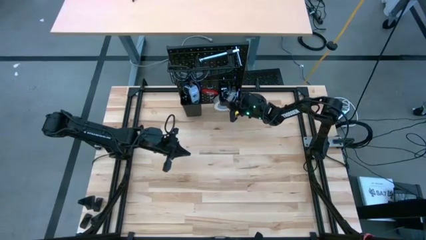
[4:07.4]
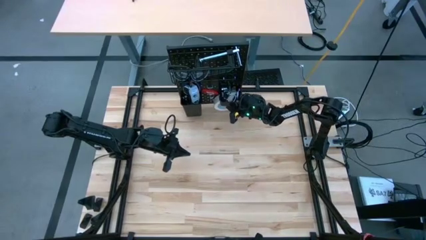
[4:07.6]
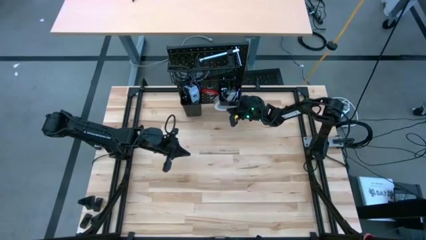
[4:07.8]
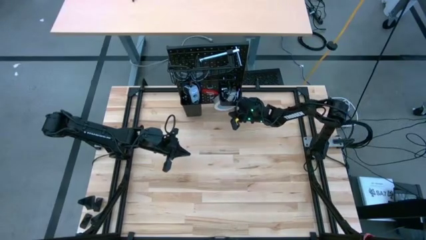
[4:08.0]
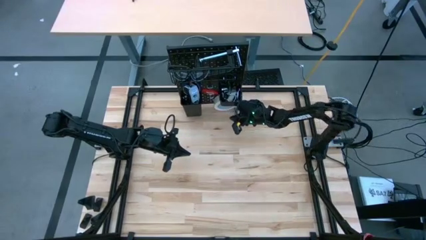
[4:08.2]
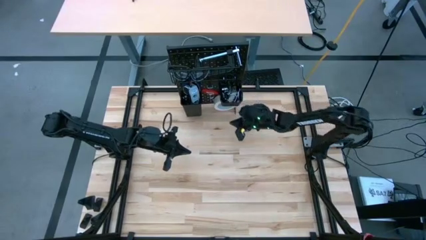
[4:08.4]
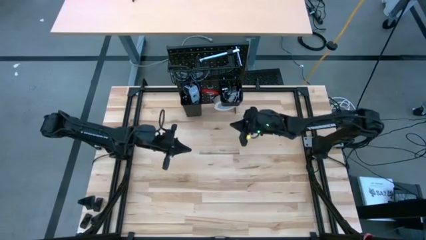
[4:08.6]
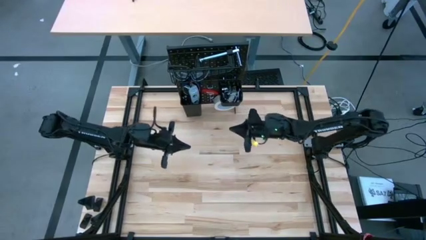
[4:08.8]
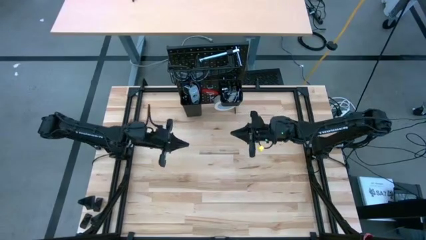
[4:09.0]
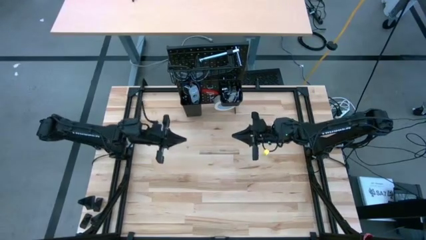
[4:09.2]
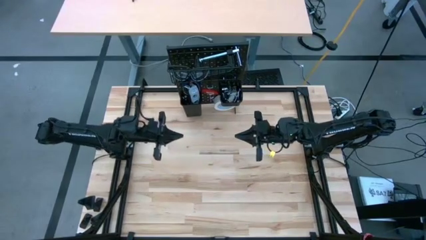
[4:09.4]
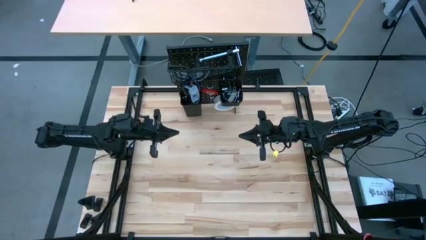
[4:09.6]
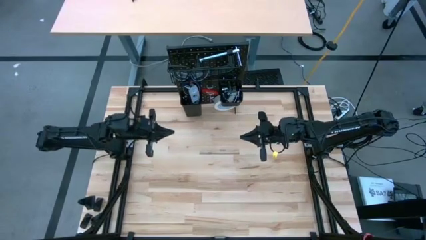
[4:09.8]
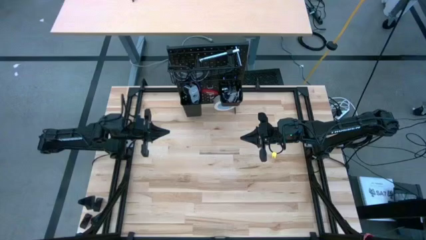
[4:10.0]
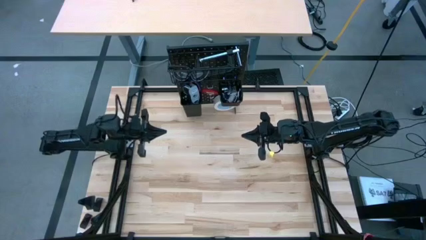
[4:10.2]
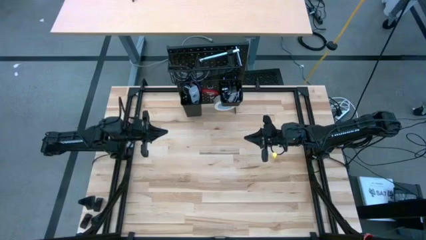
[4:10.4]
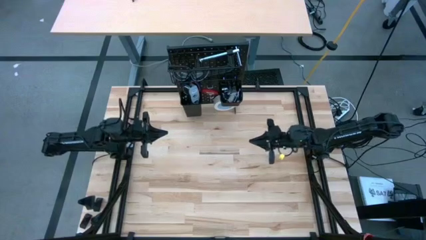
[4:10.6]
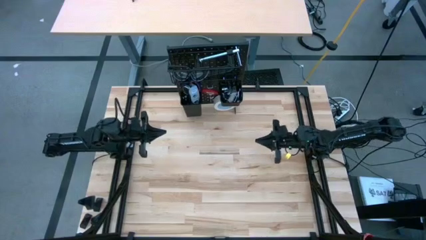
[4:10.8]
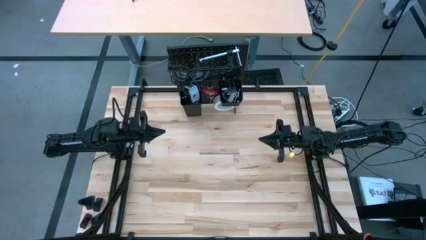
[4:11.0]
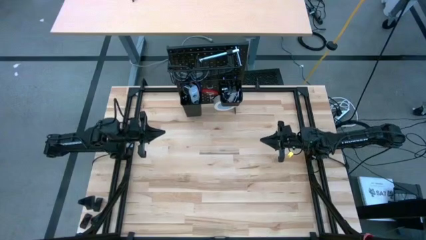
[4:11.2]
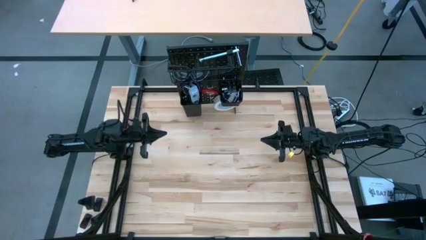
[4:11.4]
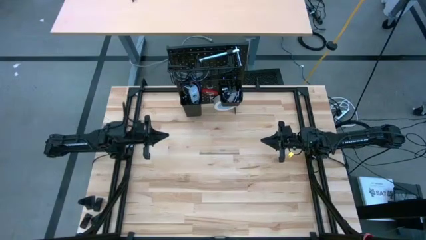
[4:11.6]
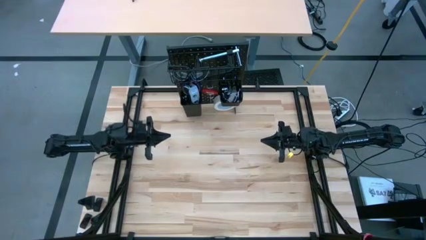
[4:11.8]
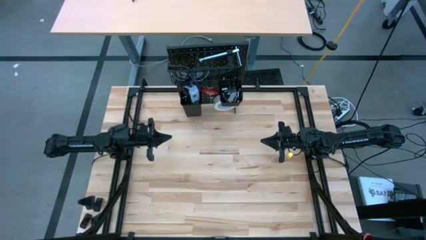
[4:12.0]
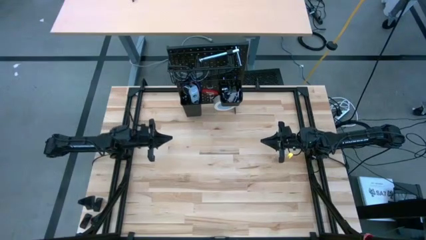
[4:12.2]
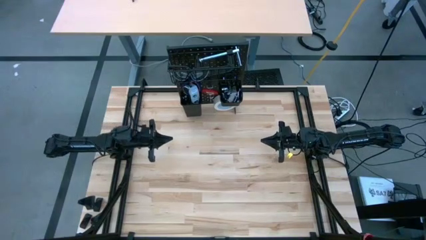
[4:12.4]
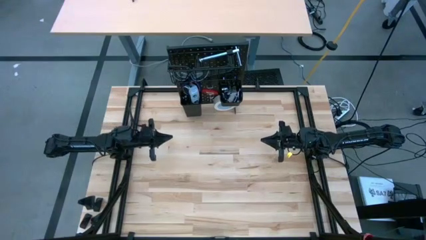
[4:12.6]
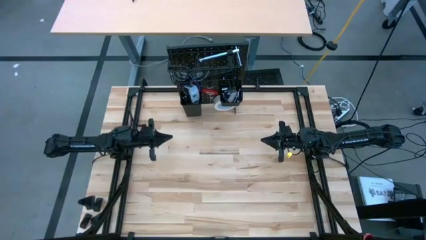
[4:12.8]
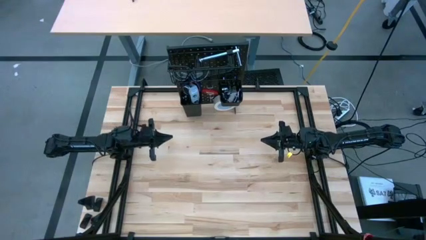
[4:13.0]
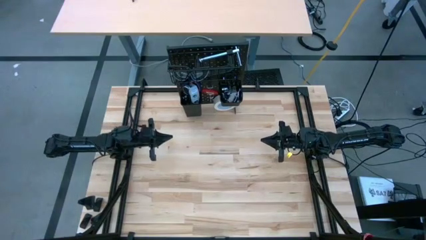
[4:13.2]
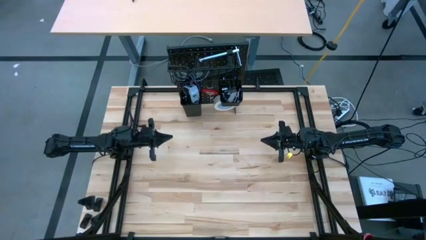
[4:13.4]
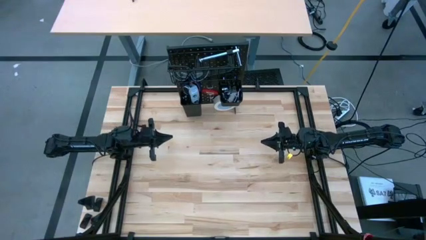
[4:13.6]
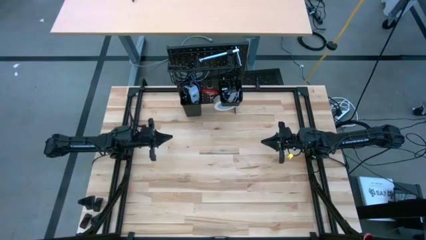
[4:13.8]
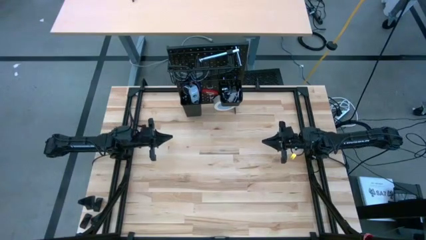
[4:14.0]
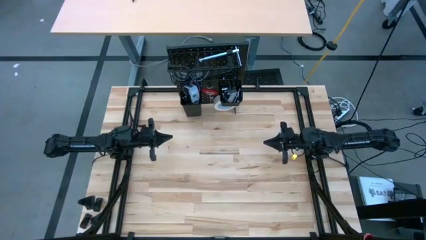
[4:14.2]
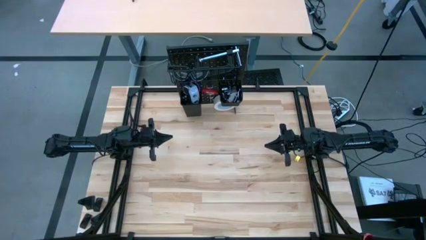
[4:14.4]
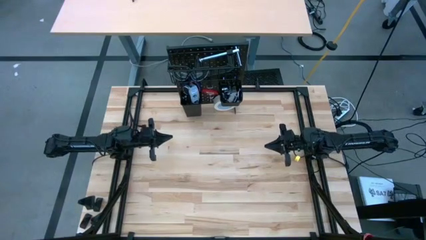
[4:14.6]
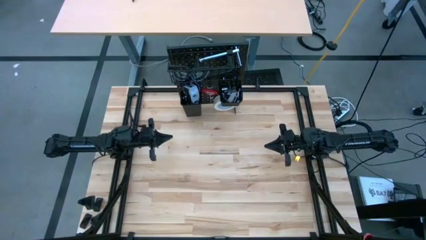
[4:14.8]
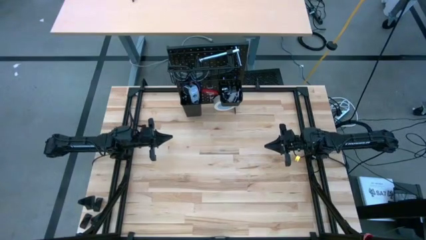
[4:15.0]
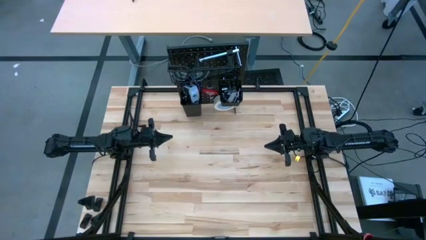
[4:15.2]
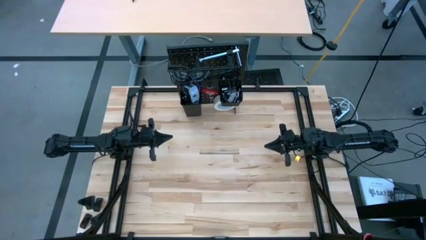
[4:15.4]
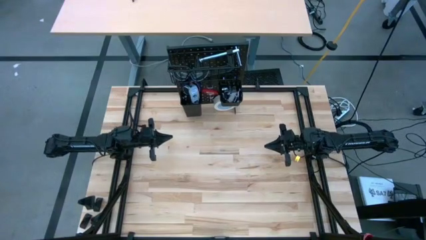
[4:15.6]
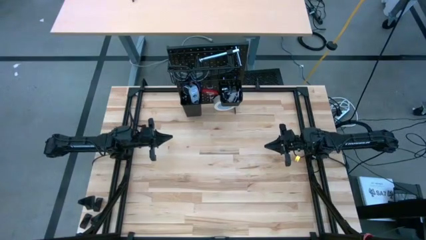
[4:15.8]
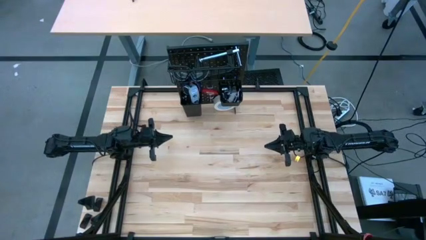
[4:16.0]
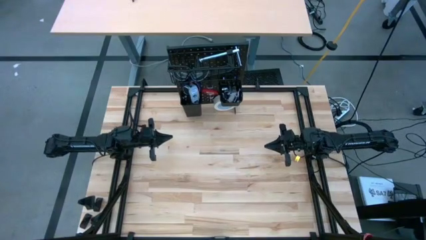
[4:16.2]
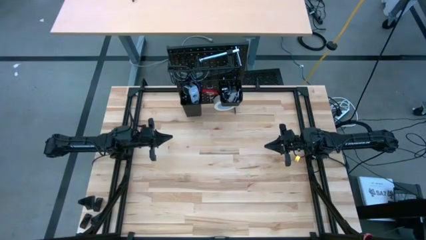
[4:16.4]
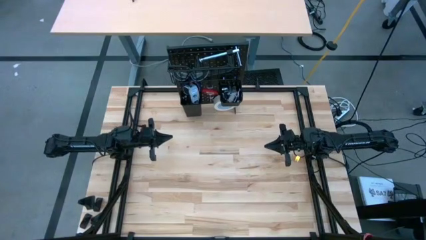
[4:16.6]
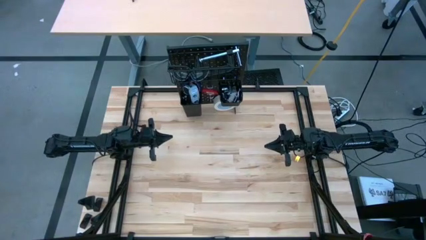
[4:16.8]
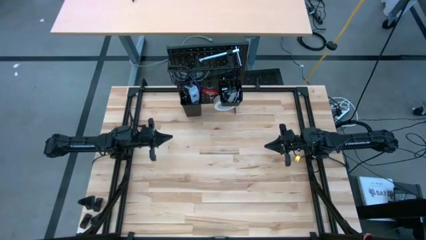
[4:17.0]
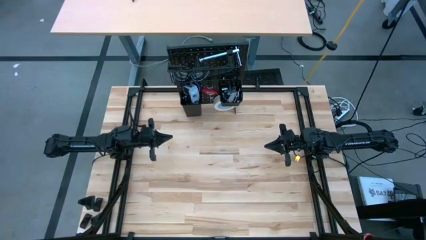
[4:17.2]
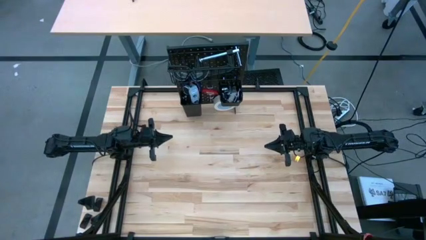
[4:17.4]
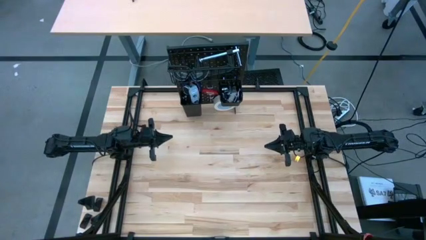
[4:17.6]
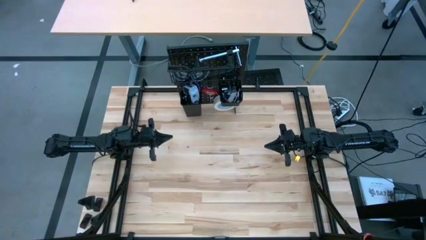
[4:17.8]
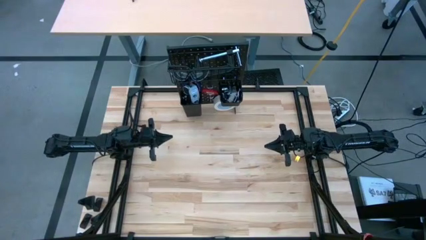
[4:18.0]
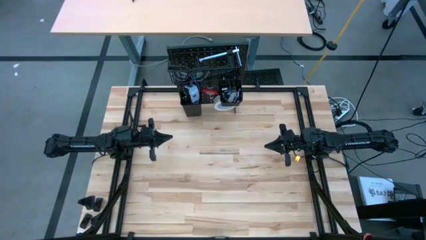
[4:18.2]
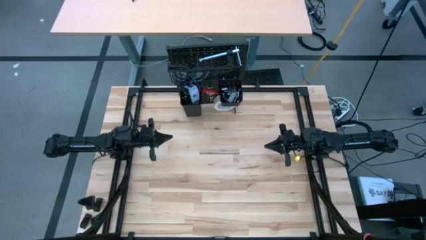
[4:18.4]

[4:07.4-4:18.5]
Task: Hang tools onto peg board
Return to Home Position
